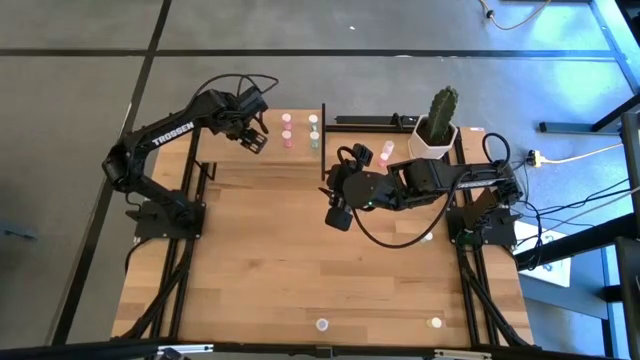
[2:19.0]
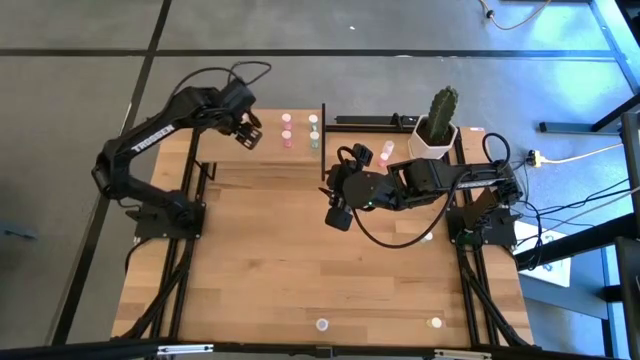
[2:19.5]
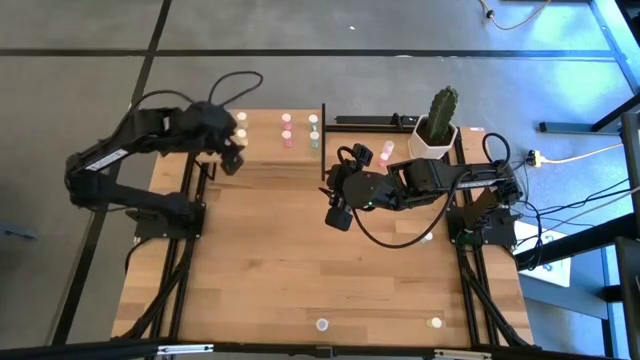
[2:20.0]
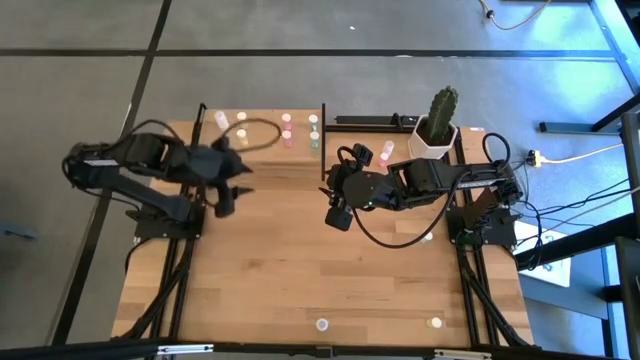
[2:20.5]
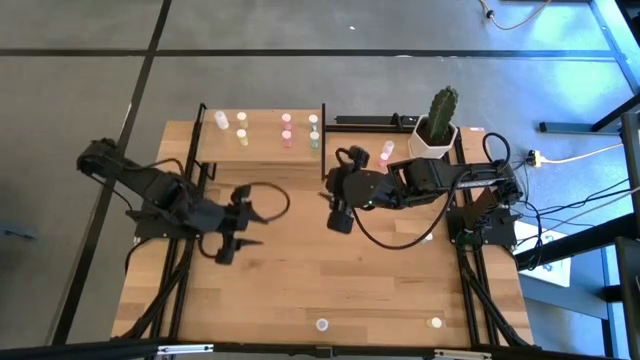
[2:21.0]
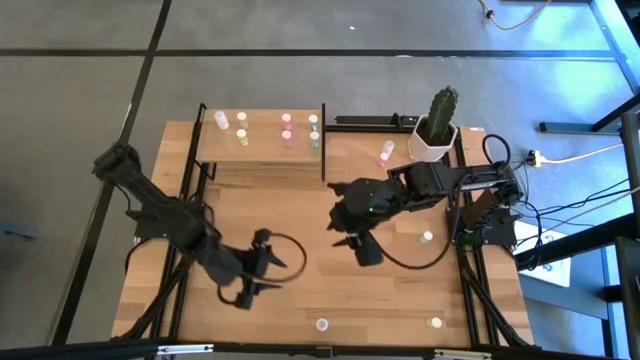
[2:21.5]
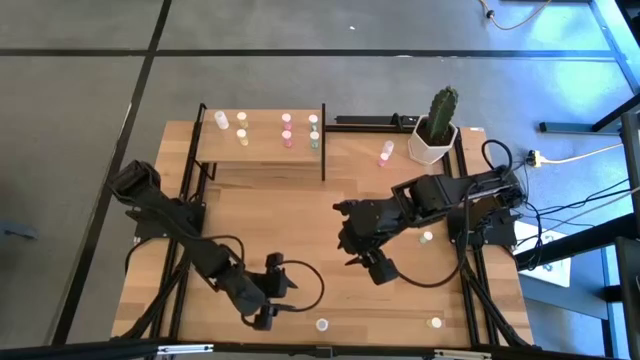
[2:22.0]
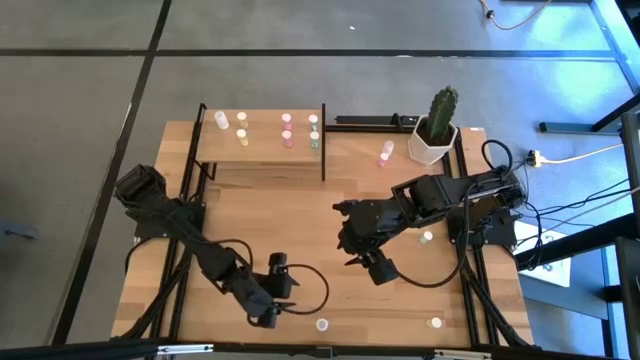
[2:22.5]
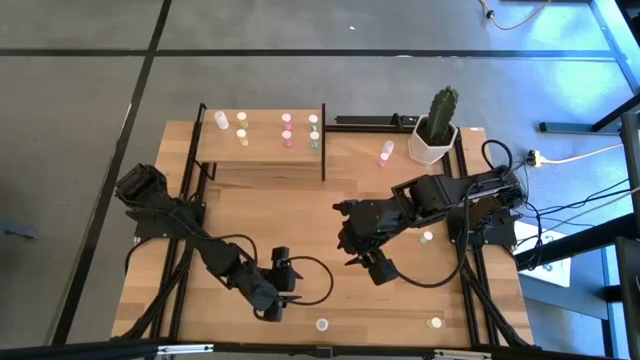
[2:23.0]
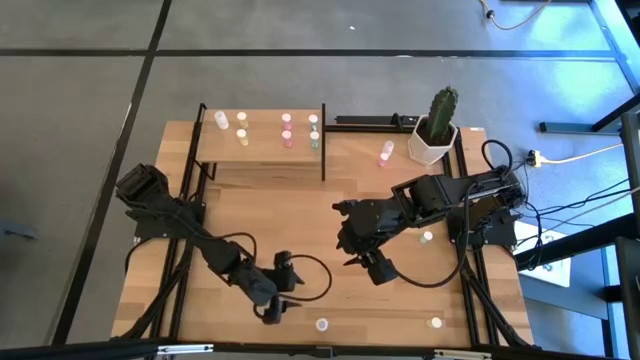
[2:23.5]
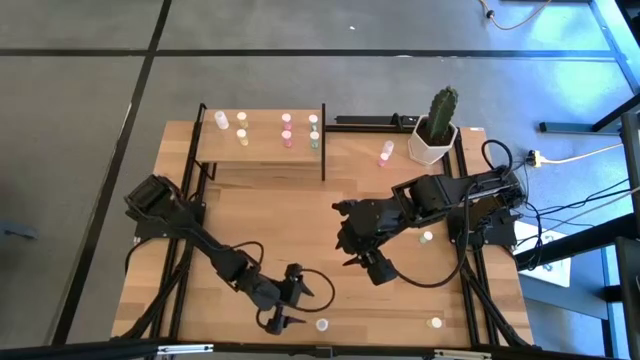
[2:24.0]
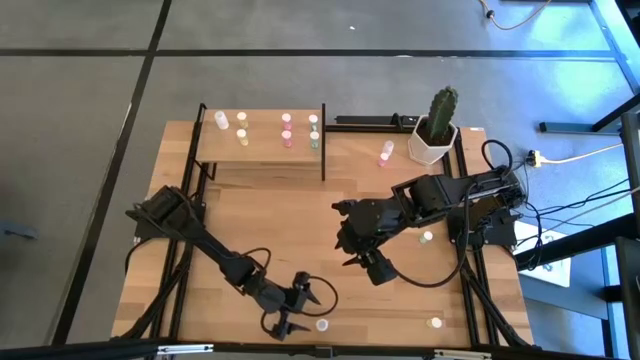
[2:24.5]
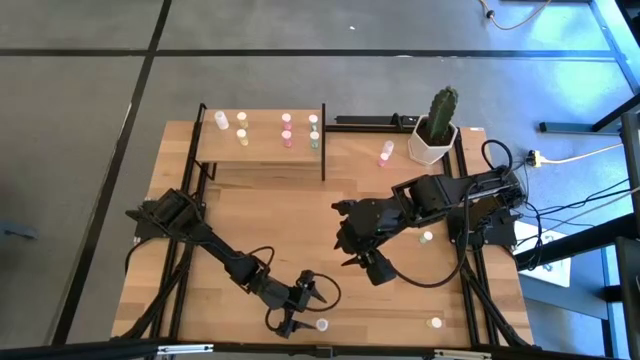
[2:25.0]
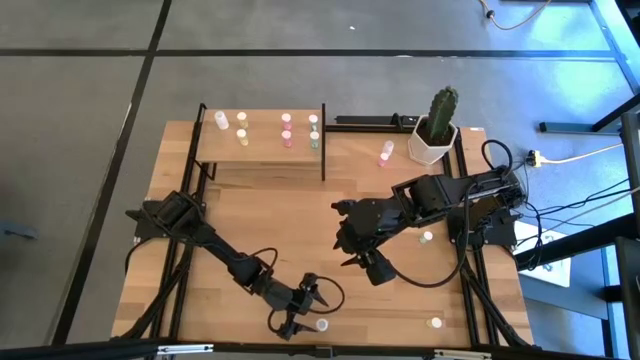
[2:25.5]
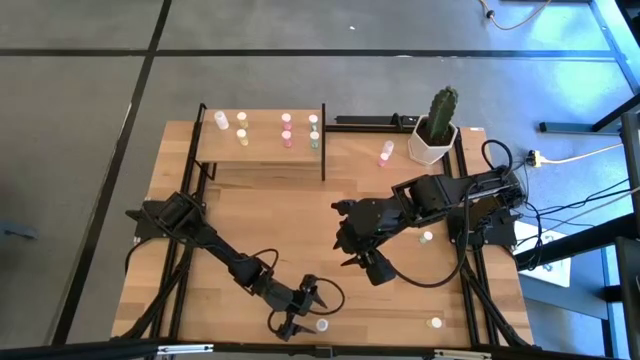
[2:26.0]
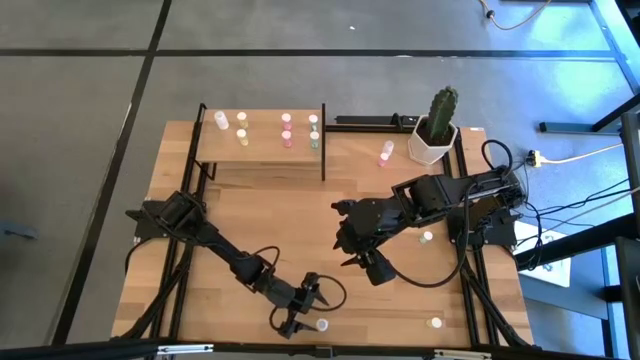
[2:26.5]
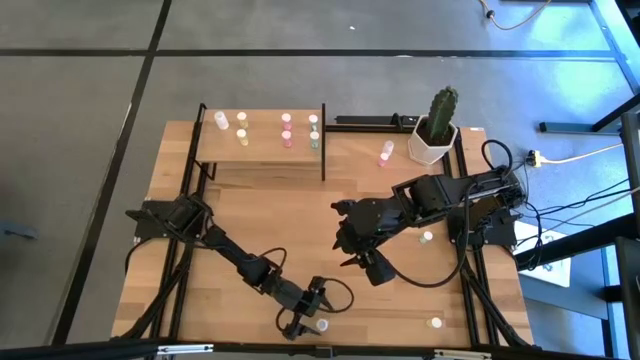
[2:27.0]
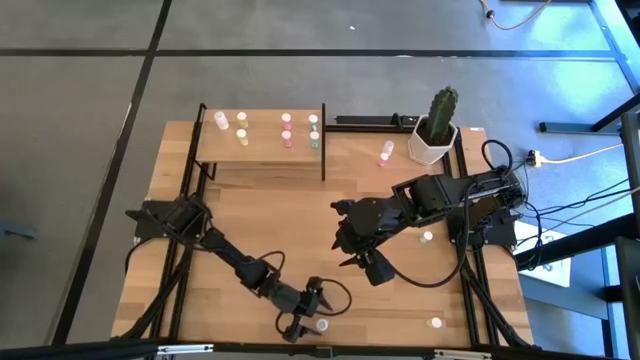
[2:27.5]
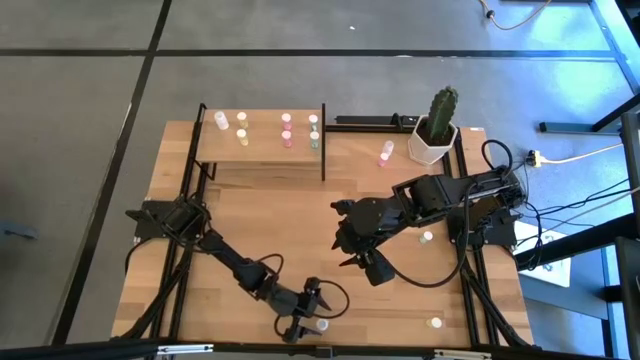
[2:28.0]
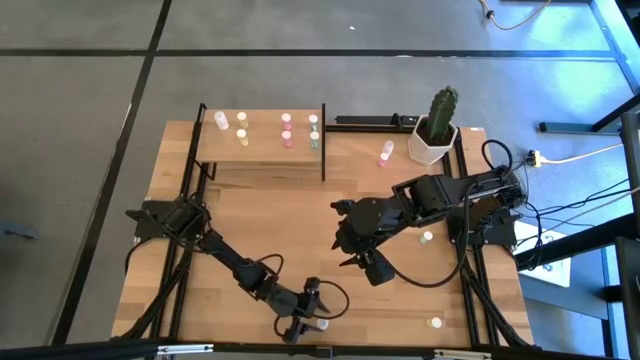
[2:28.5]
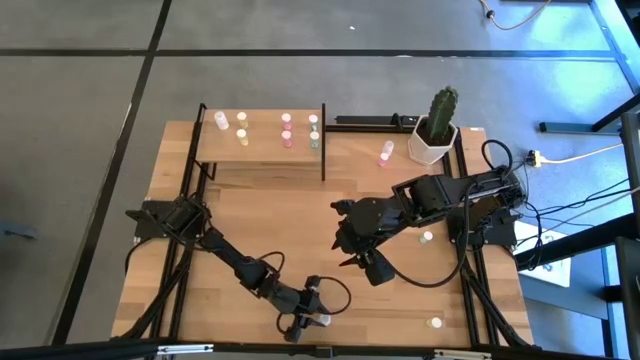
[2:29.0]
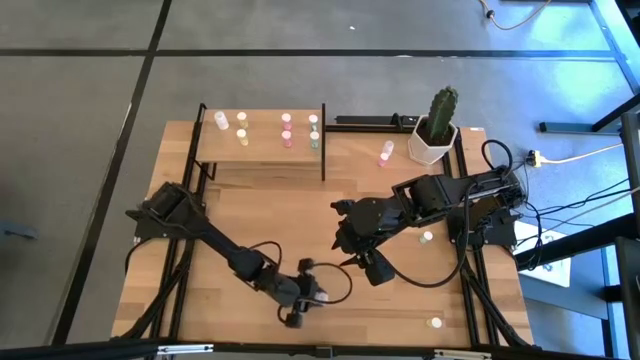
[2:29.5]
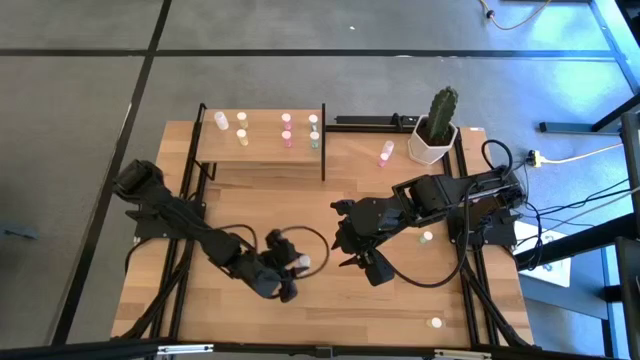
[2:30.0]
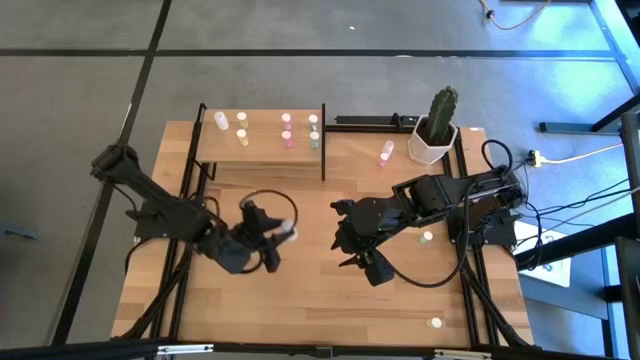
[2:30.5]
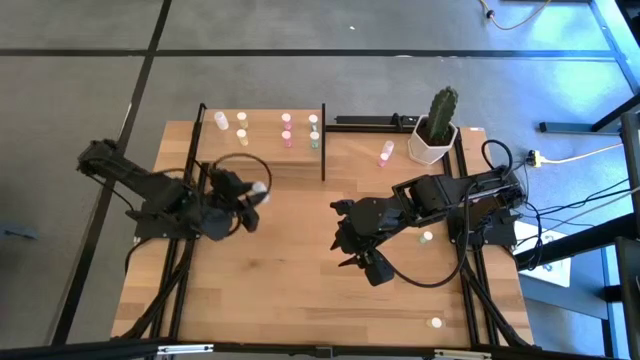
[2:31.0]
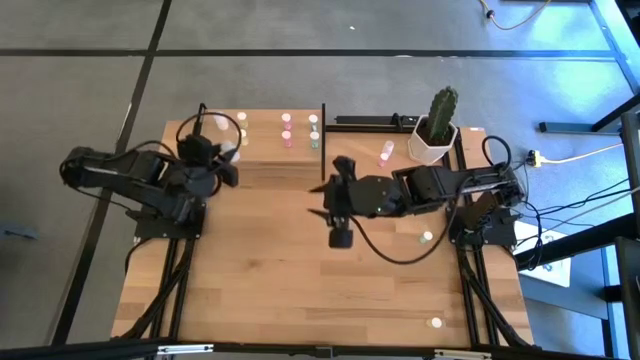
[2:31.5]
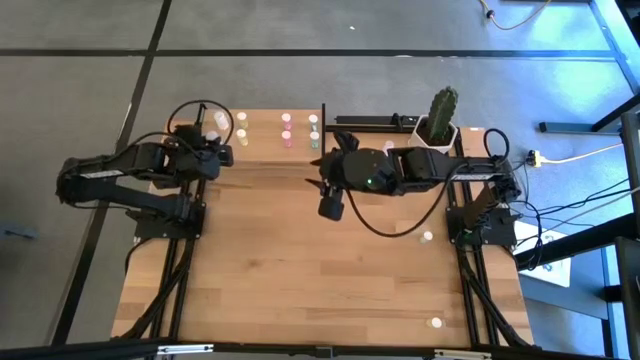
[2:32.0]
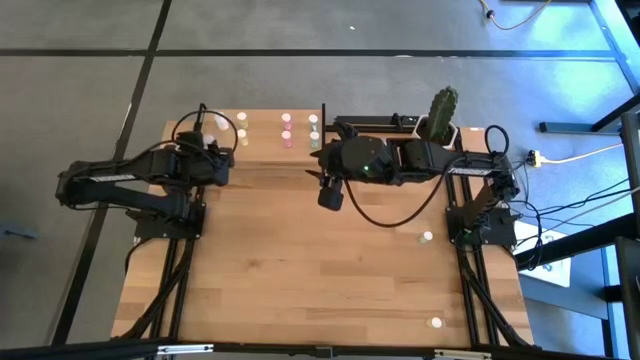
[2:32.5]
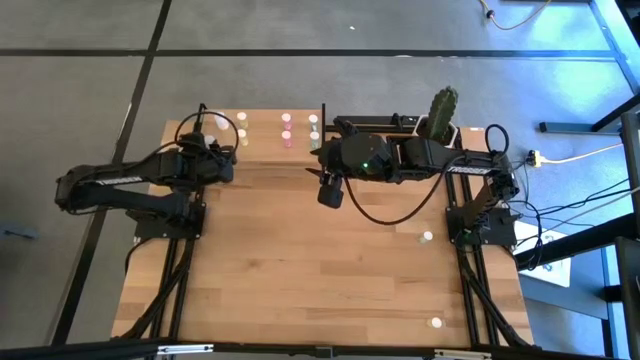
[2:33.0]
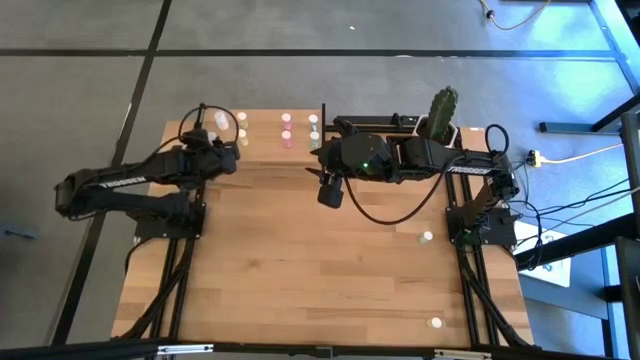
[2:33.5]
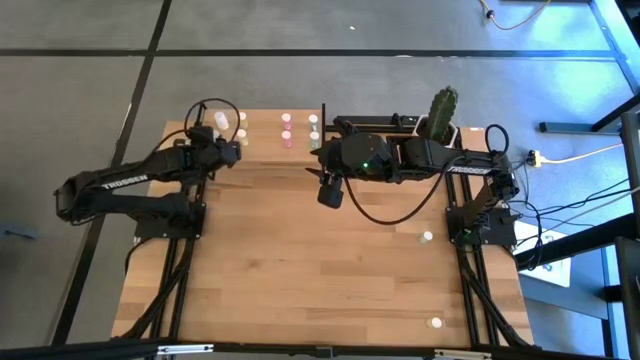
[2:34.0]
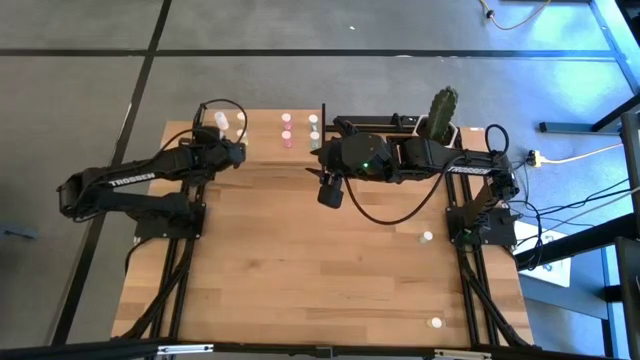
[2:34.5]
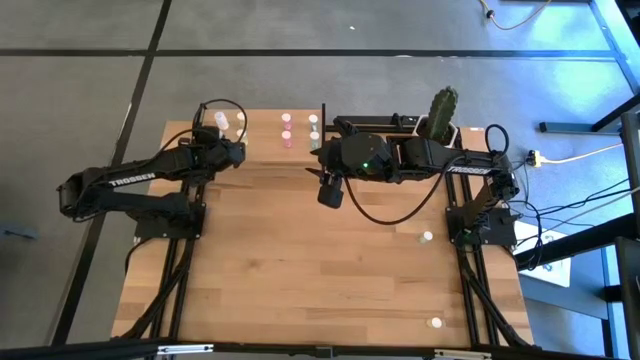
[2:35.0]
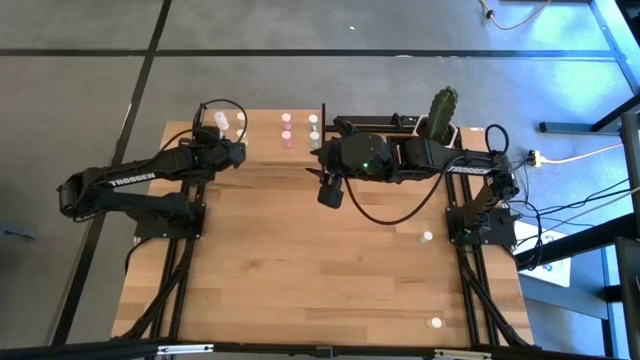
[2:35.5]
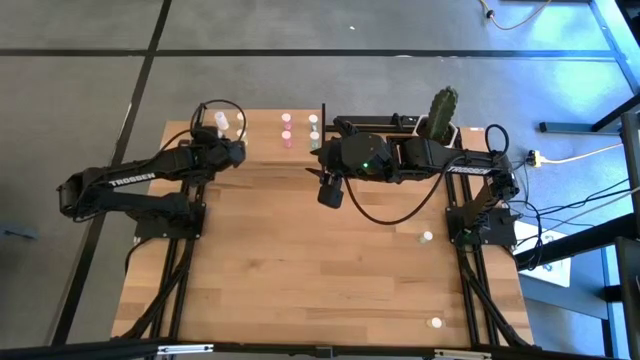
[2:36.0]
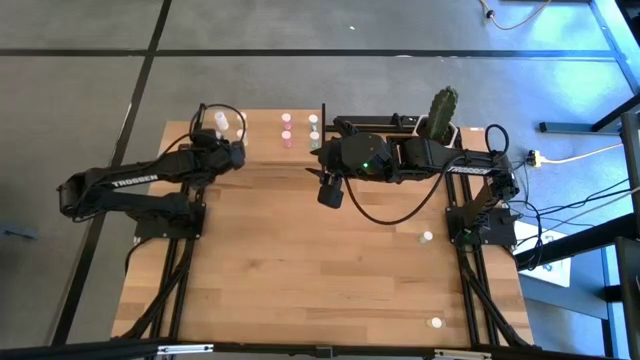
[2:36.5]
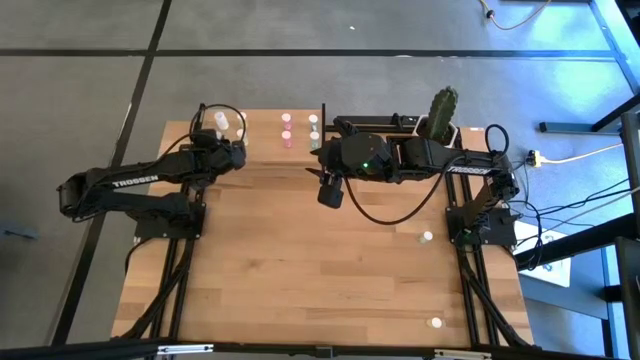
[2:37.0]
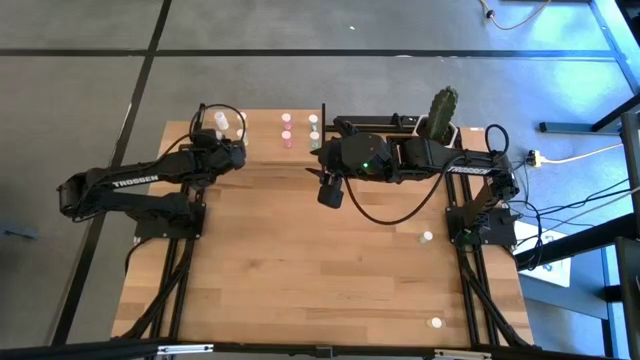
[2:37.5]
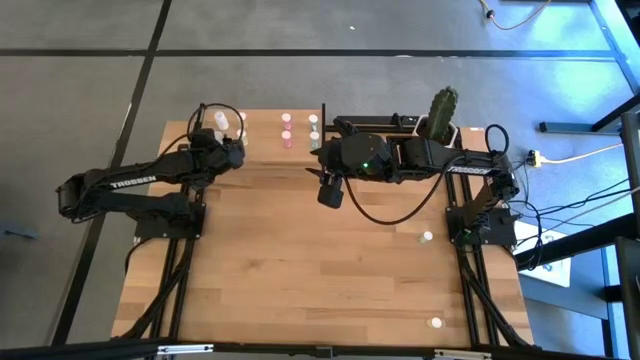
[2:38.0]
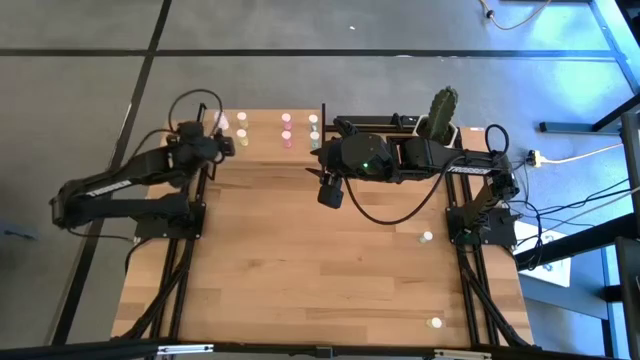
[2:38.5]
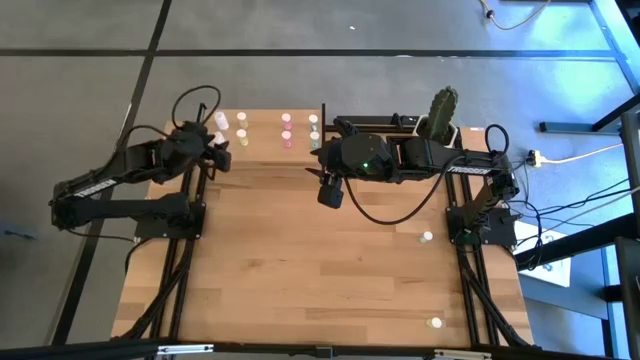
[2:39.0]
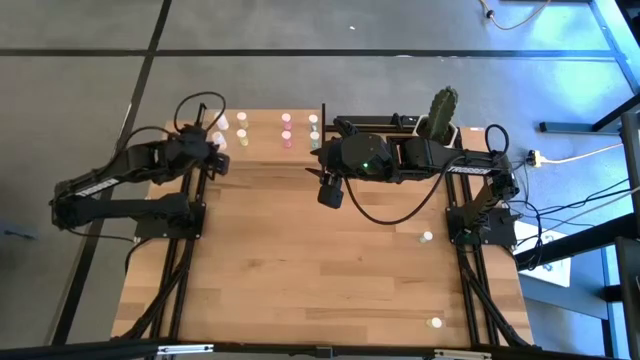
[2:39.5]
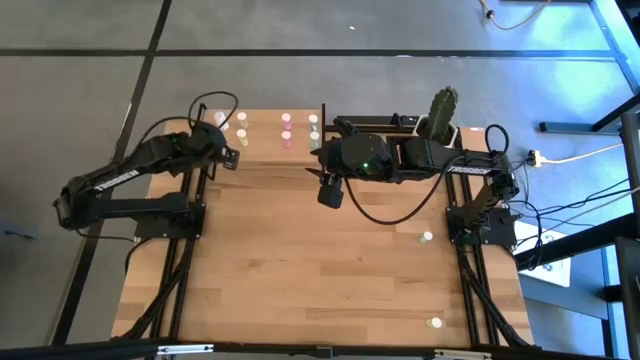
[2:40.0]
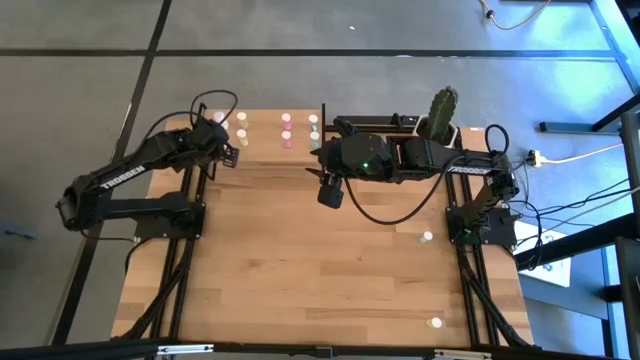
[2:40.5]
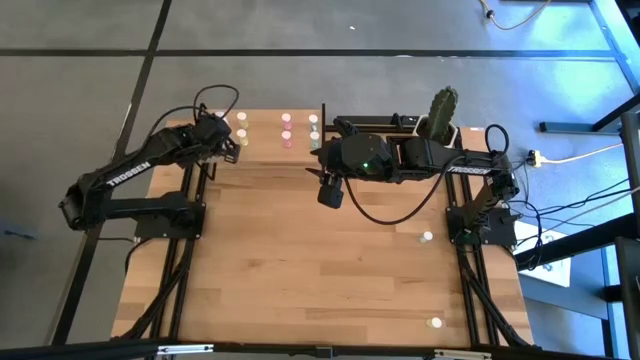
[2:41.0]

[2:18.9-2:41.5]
Task: Pick and place medicine bottles onto shelf by color
Put the bottom white pill bottle on the shelf and align it with the other white pill bottle
